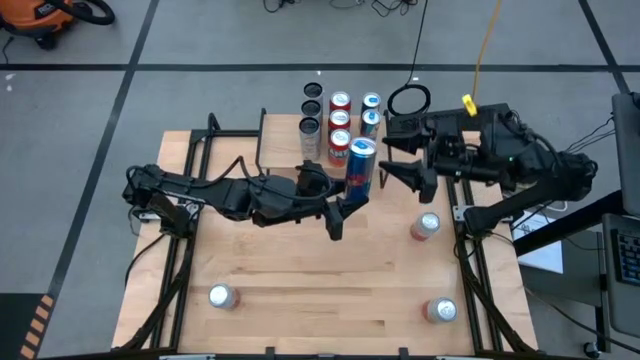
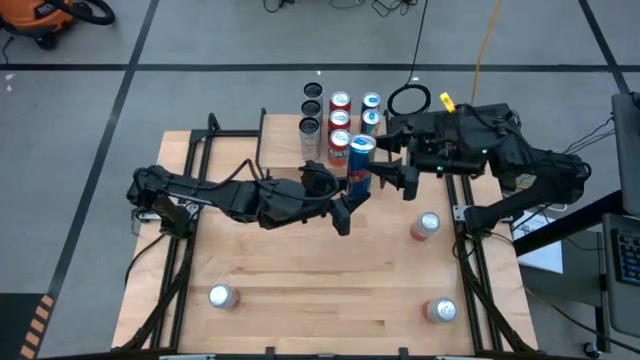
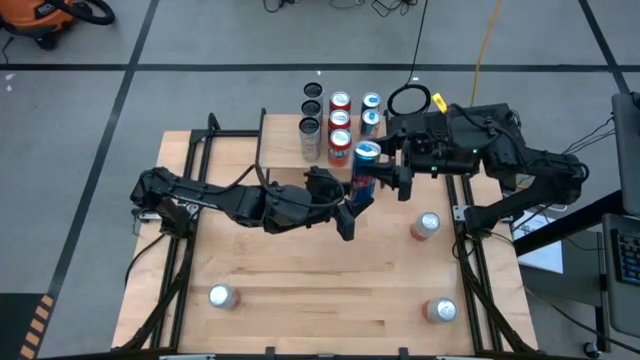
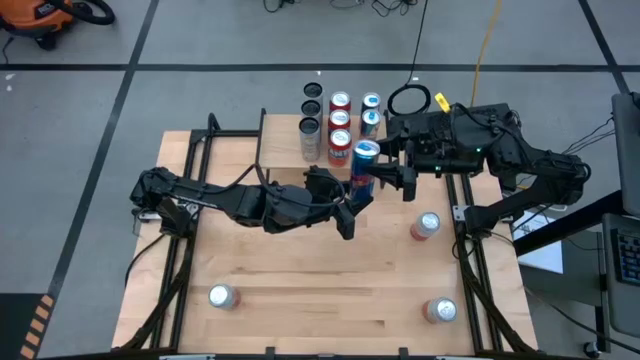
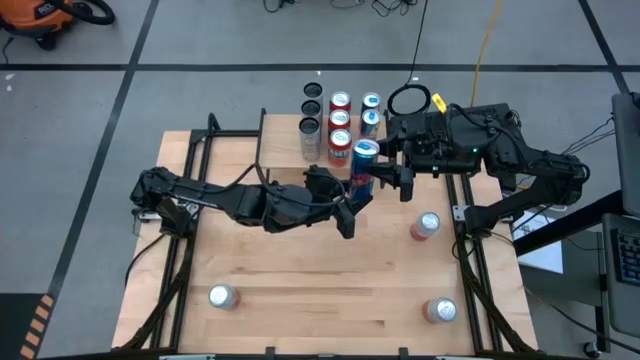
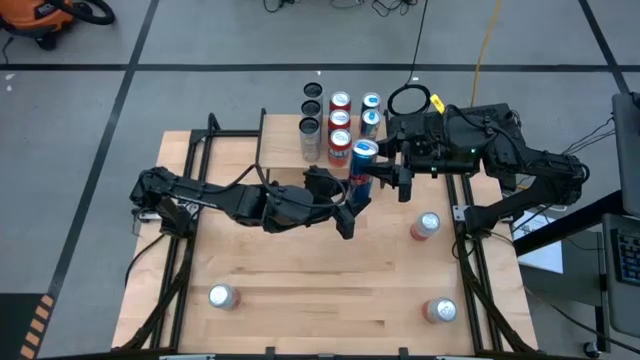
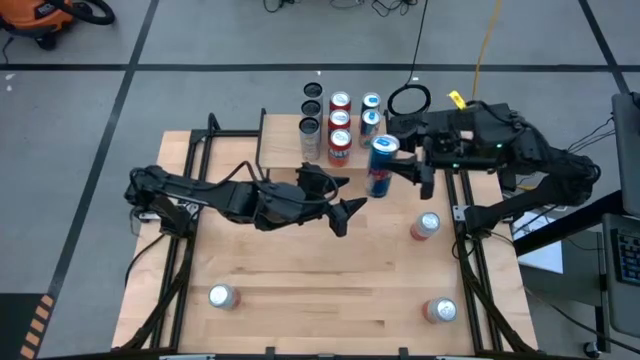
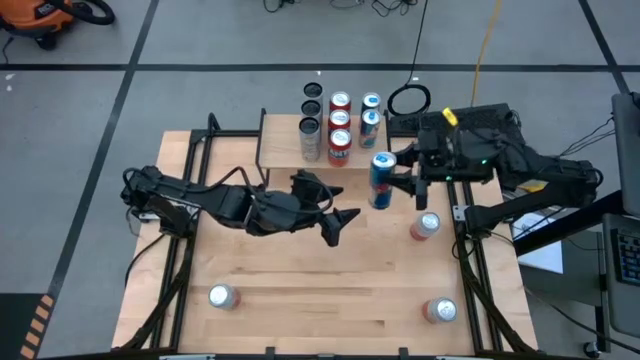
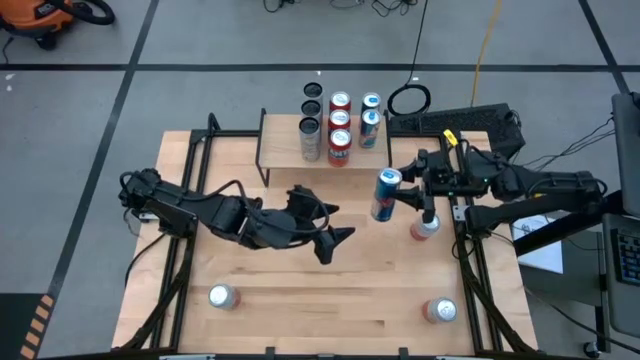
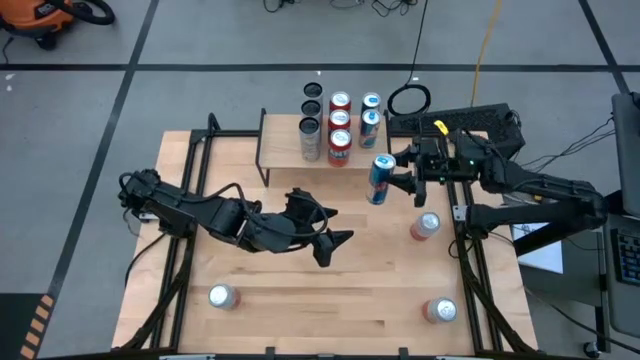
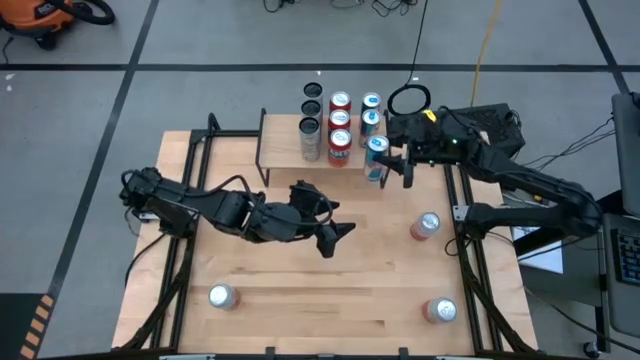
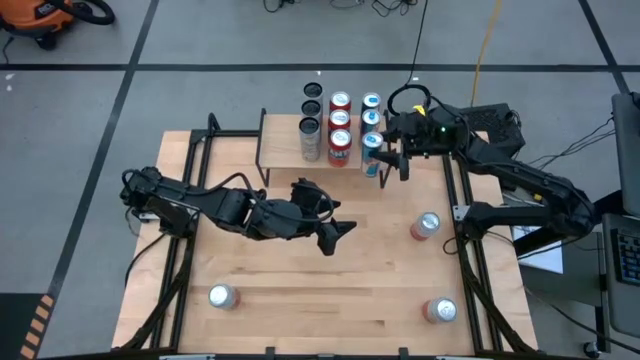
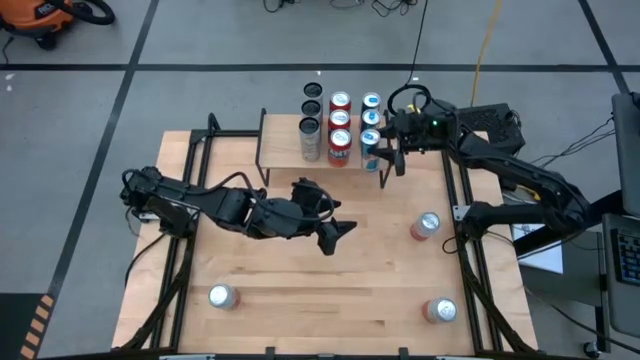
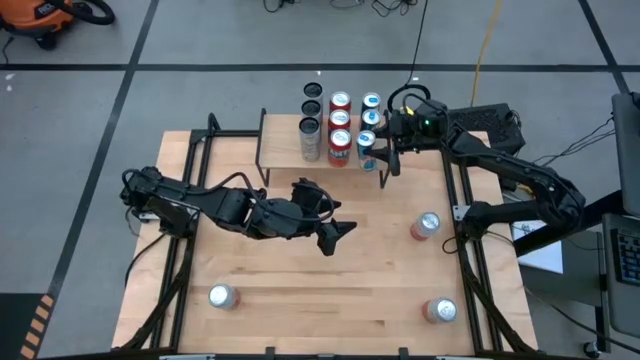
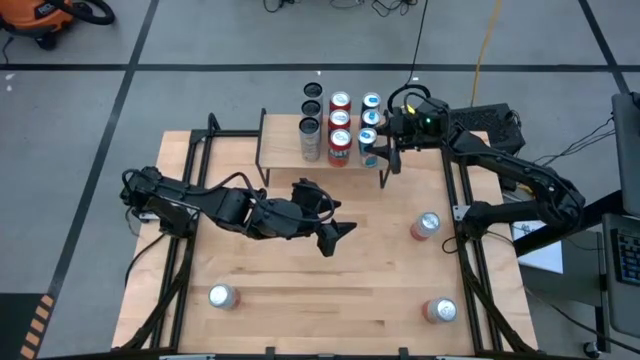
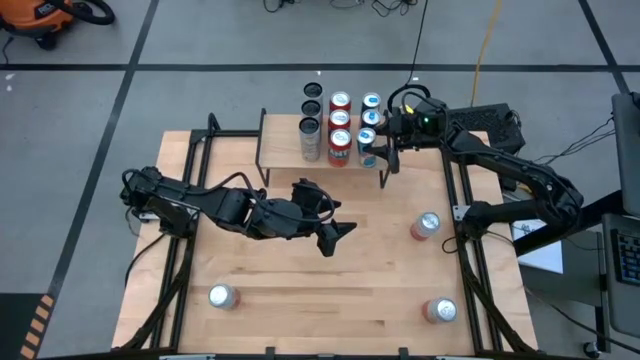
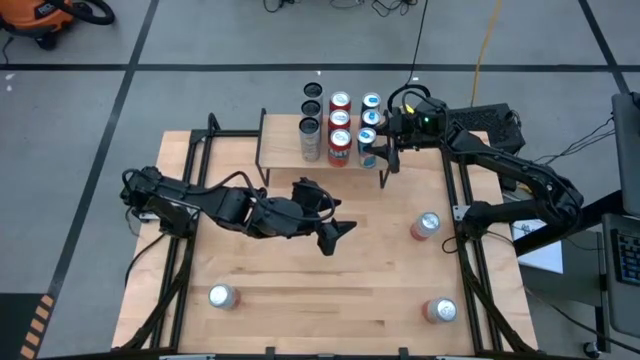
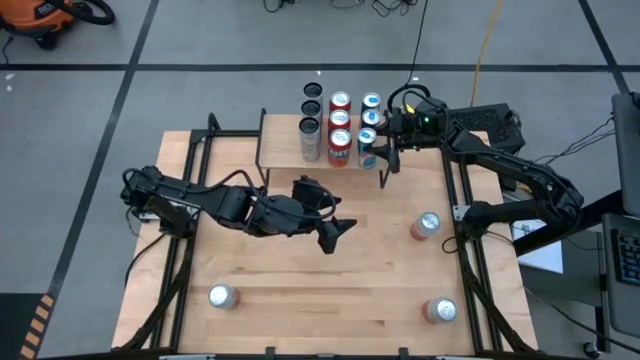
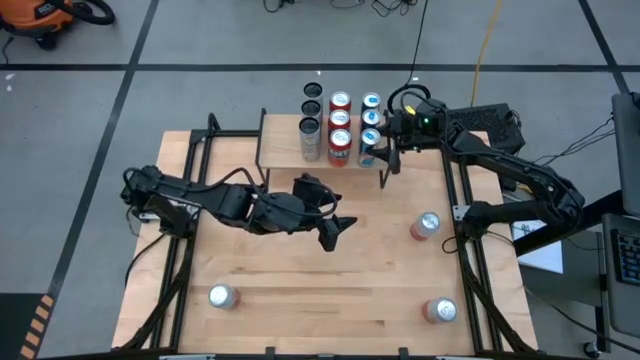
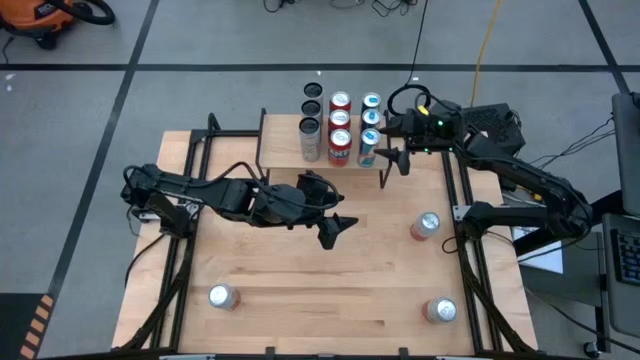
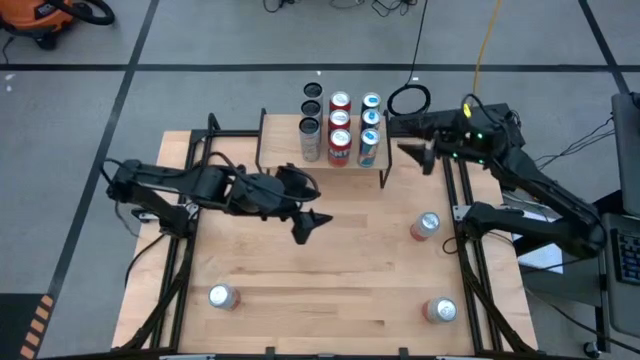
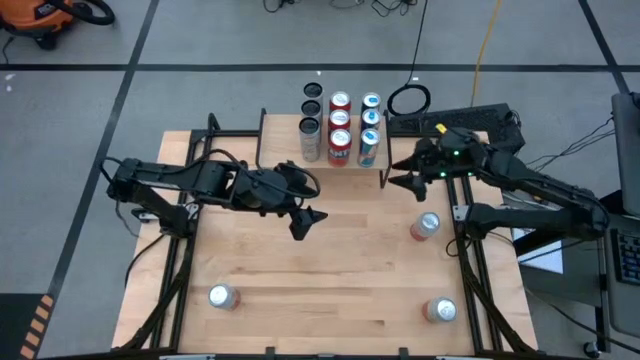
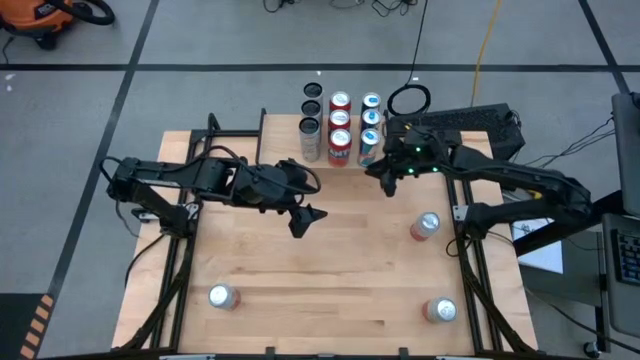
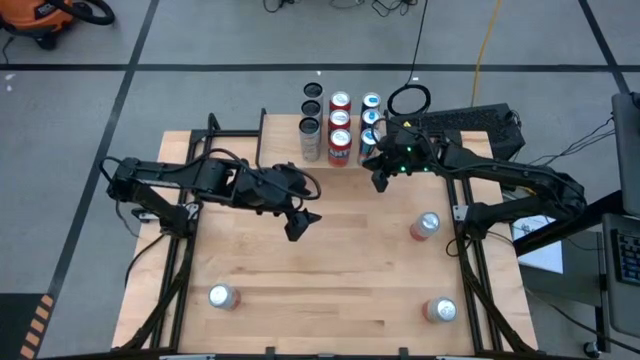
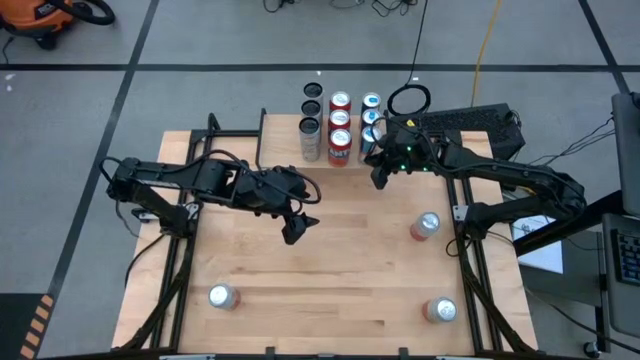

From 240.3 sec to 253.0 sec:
Task: Place canned beverage on shelf
Put the blue soda can aligned with the other blue soda can on the shelf
